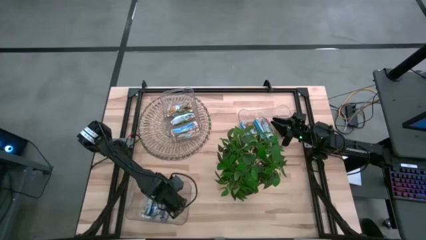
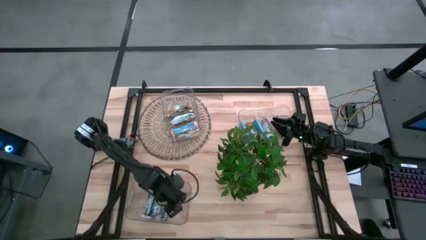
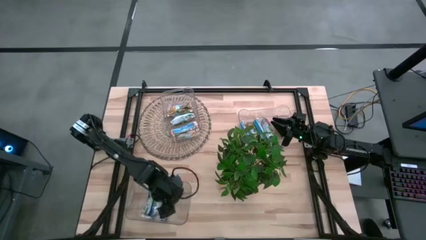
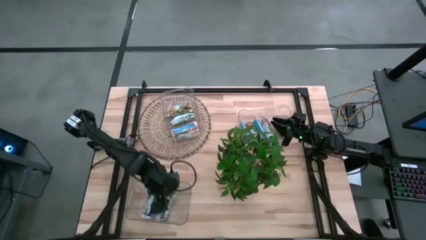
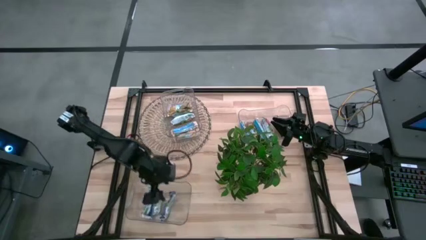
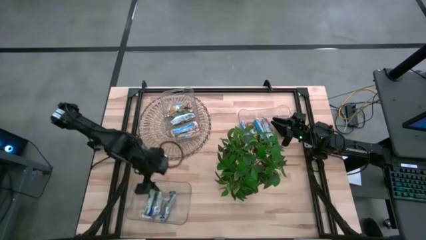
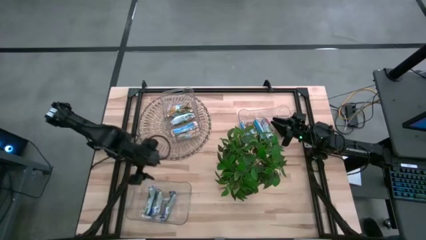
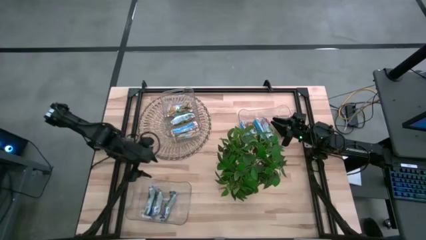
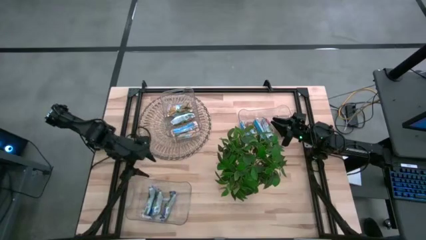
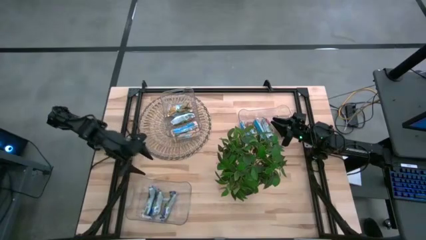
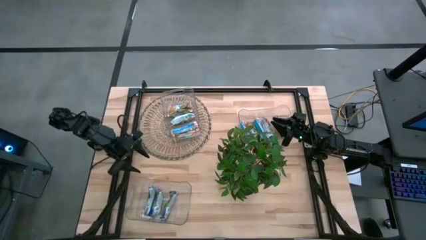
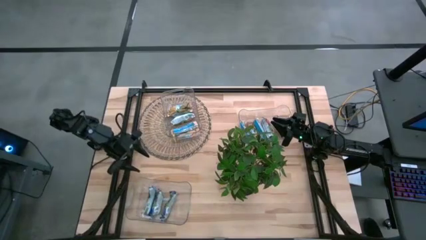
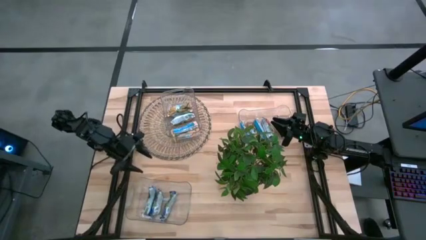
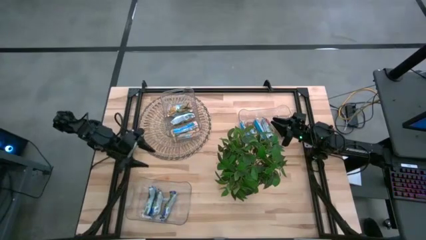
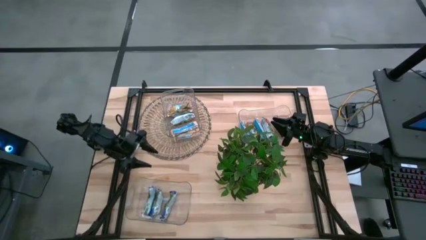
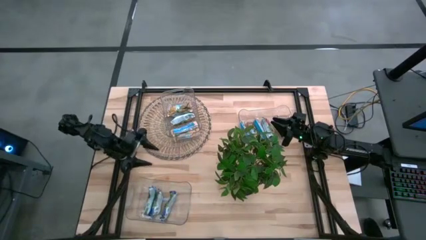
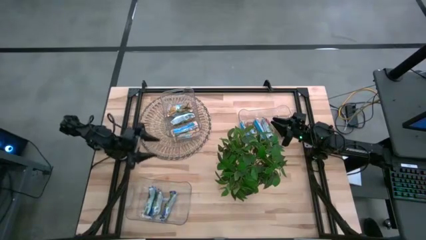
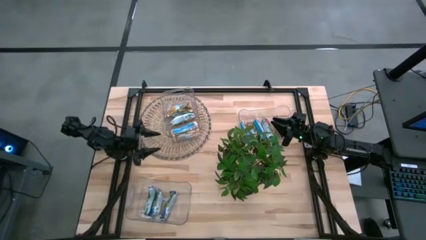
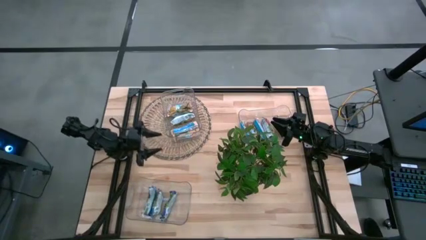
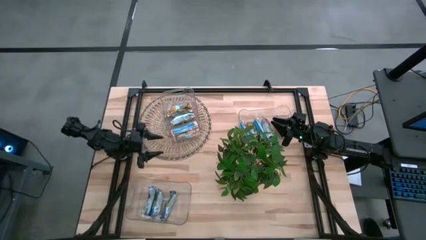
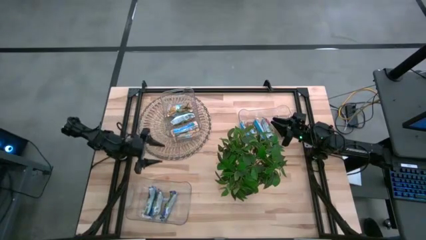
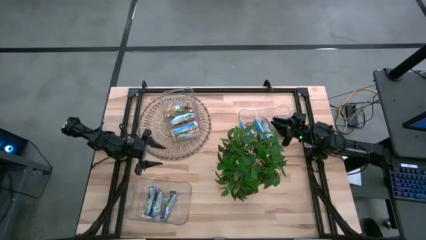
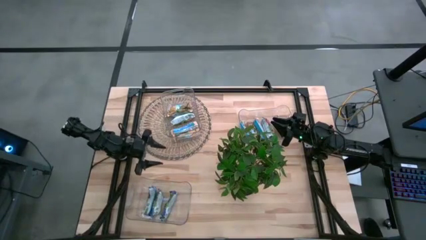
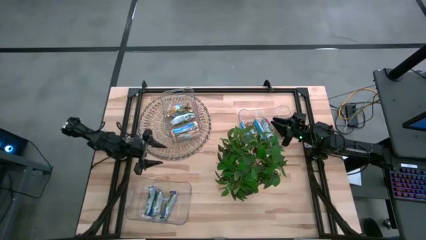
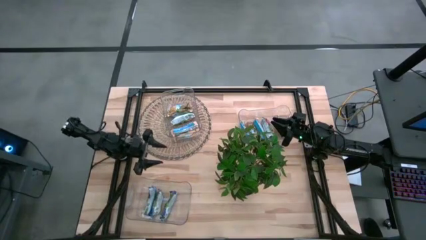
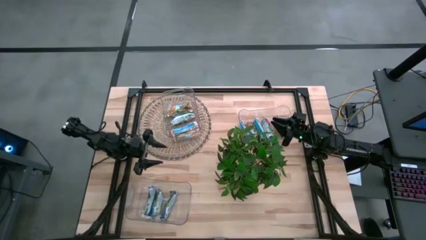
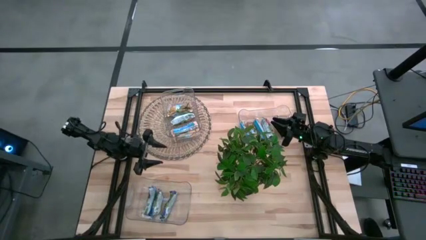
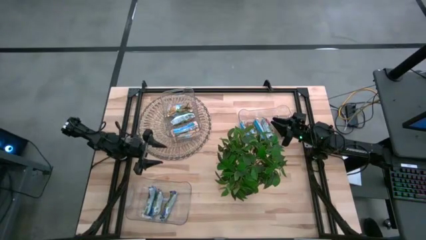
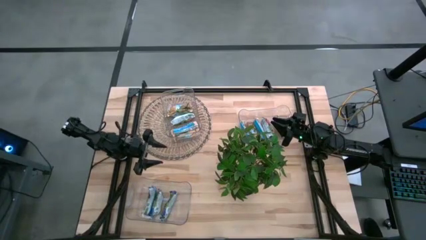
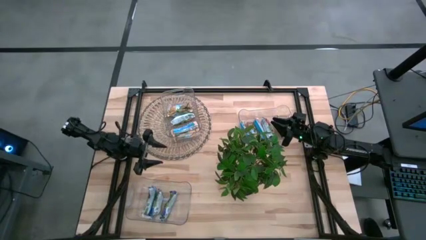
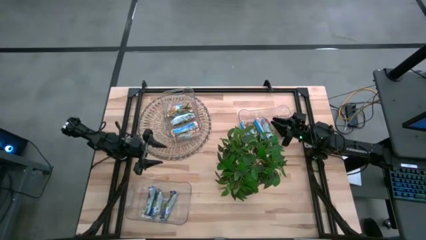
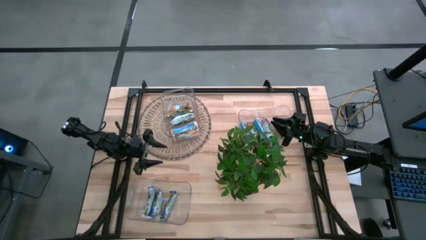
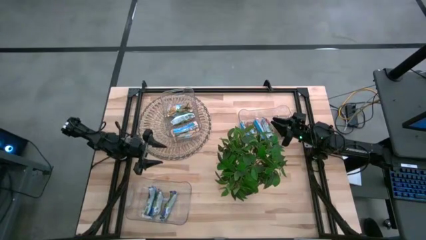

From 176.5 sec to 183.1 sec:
Task: Pick and place Granola Bars by type
Return to Home Position

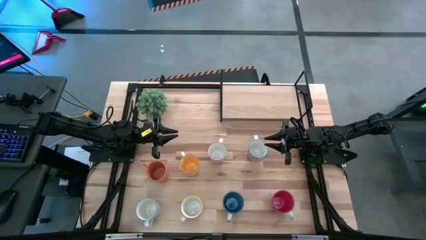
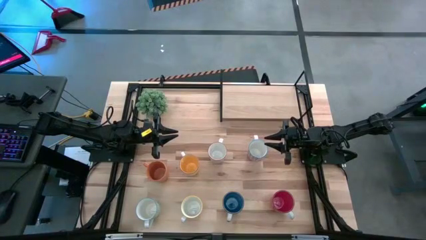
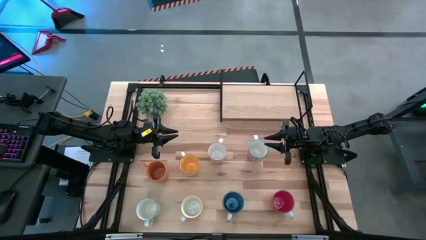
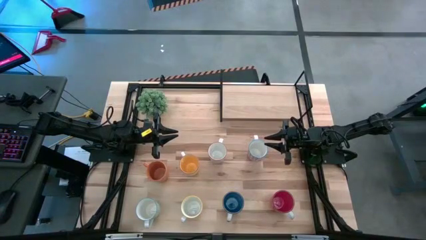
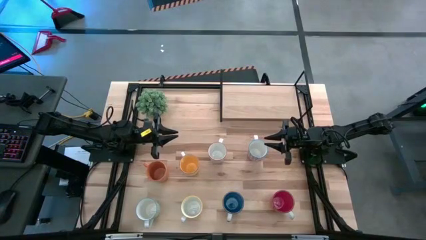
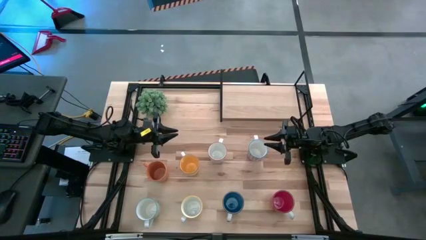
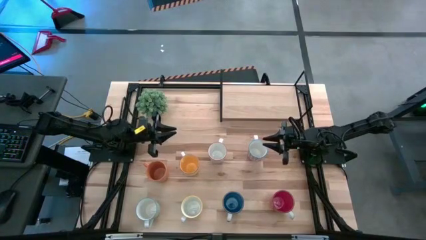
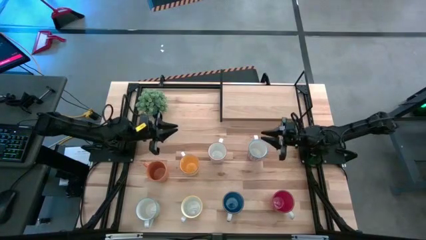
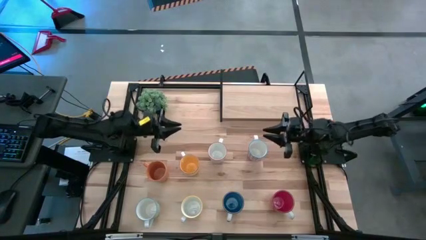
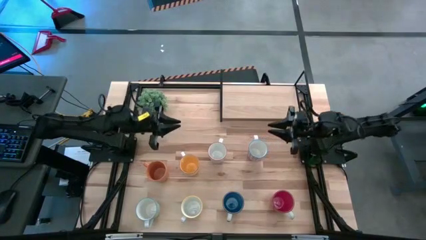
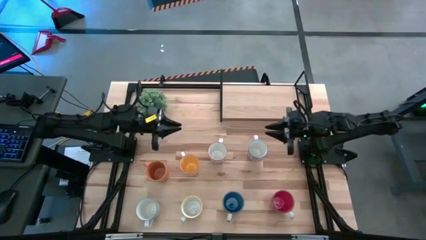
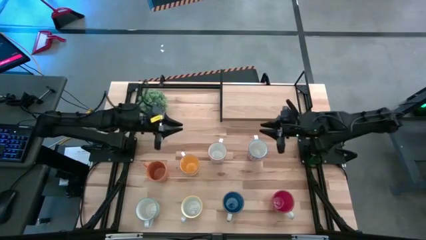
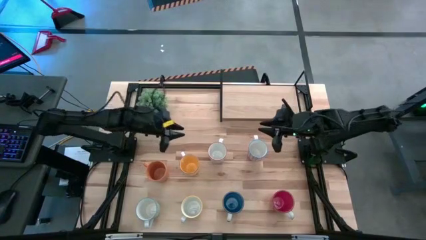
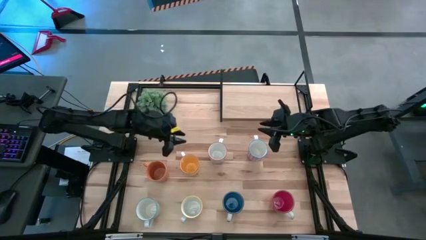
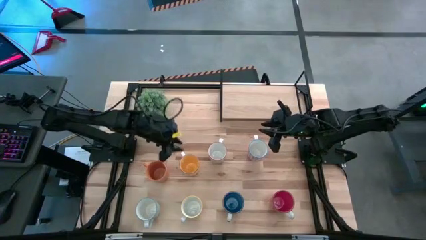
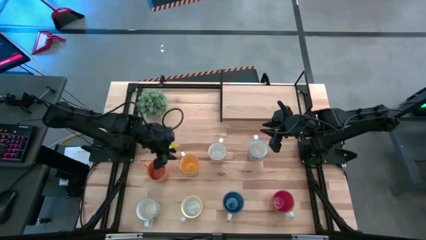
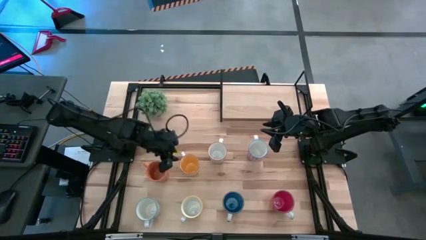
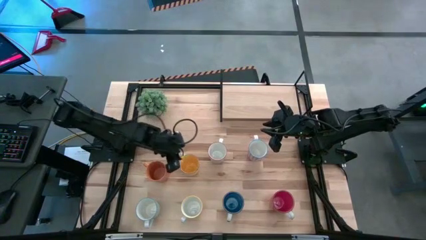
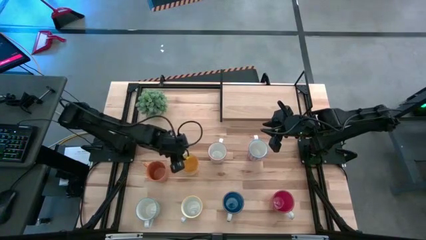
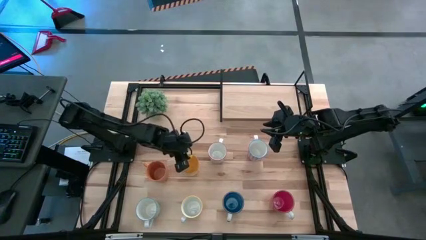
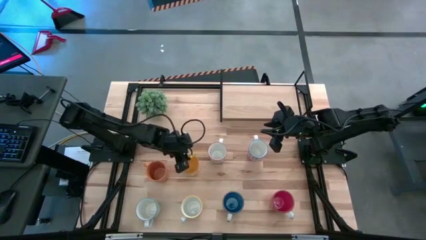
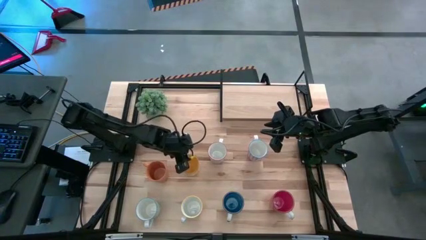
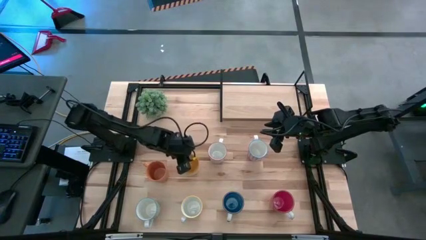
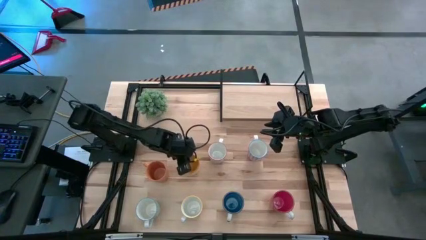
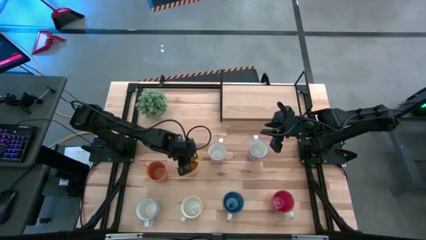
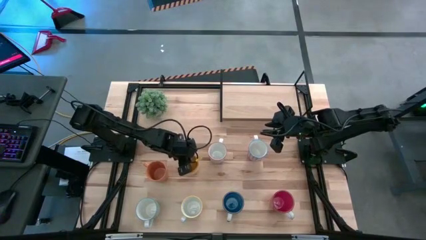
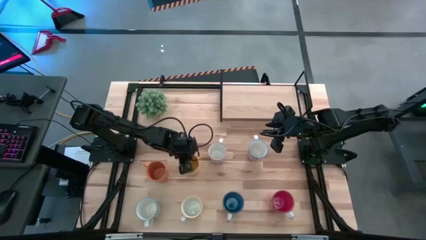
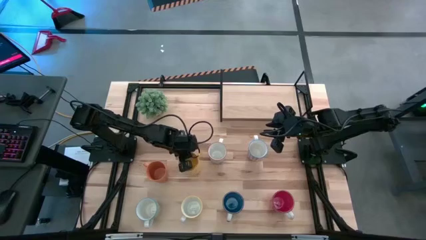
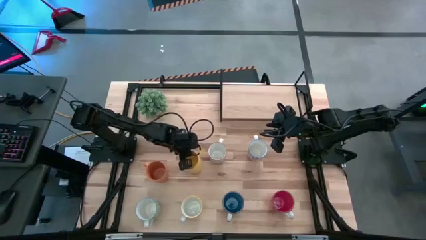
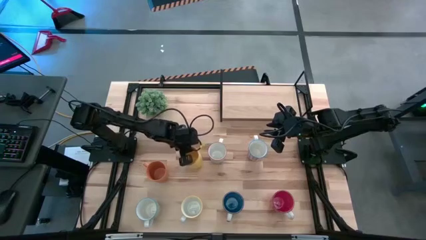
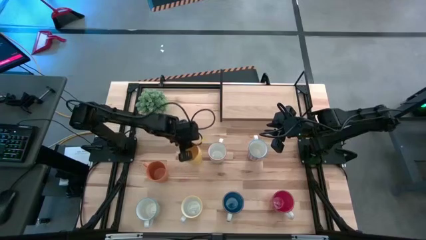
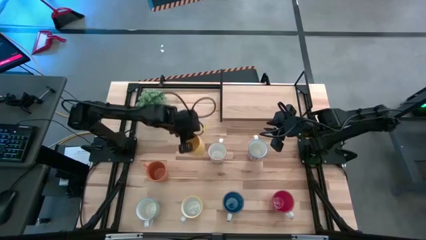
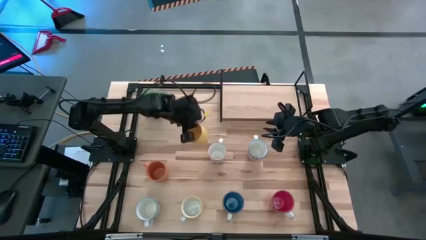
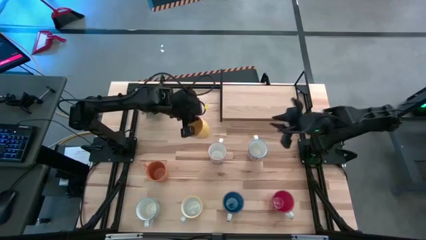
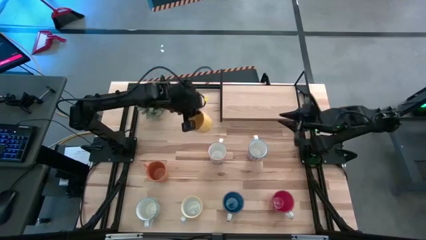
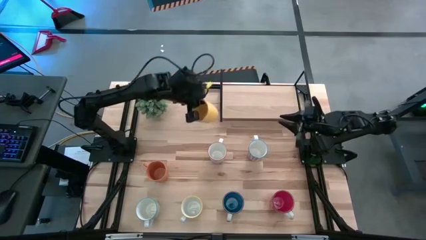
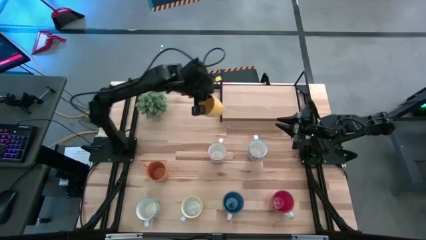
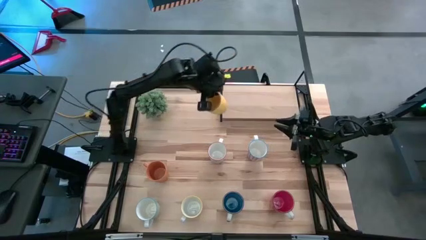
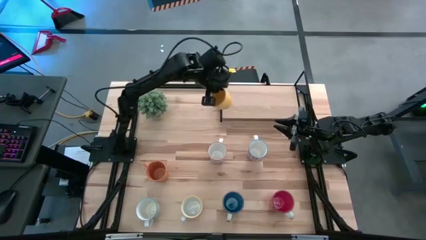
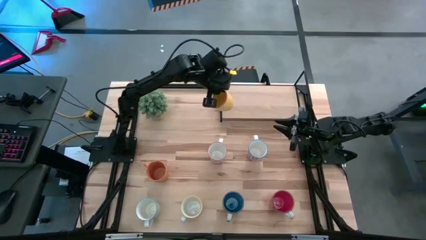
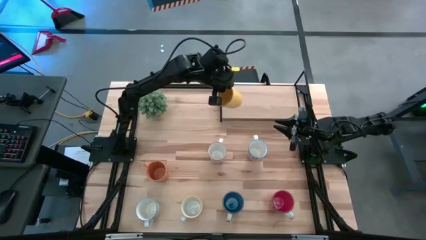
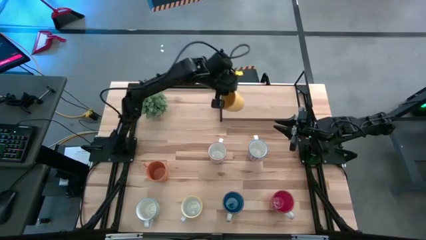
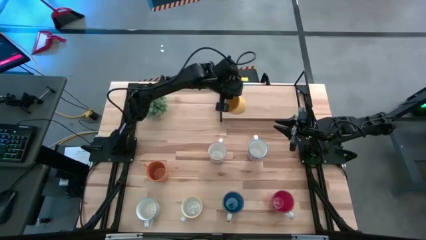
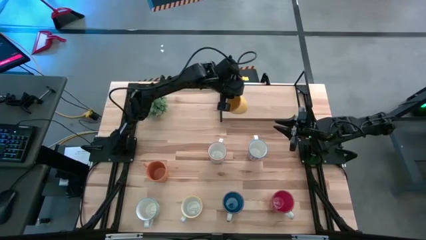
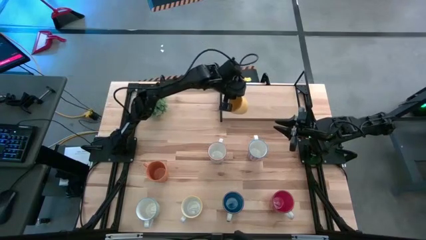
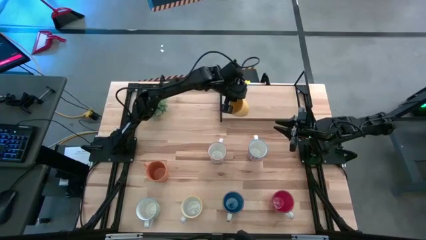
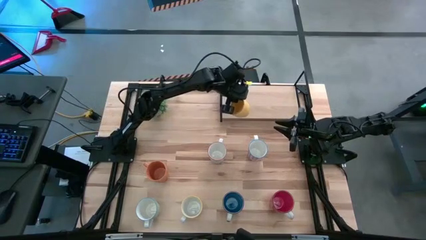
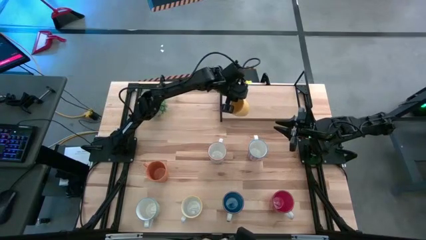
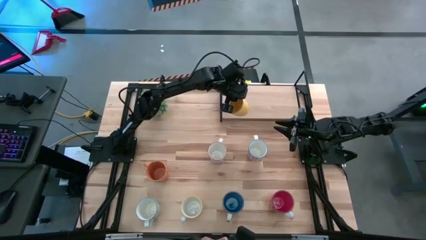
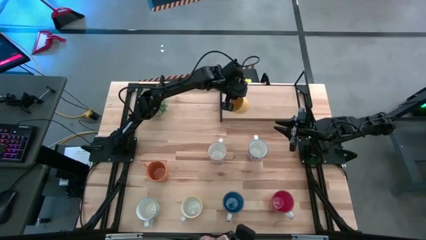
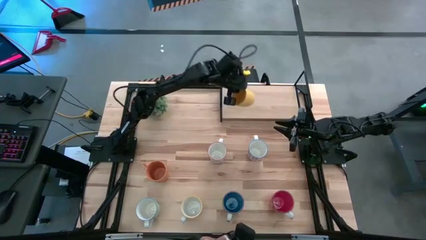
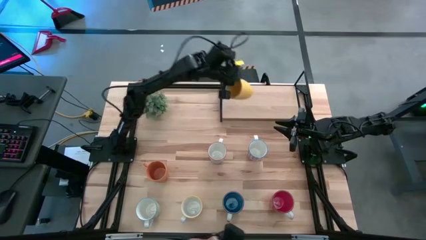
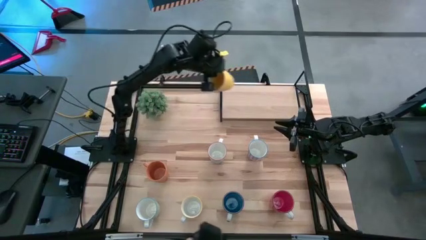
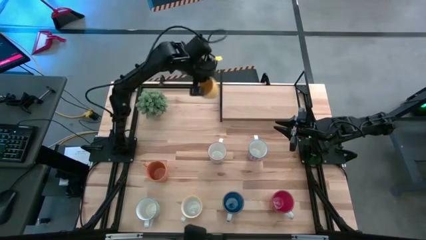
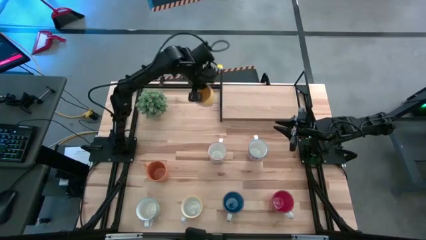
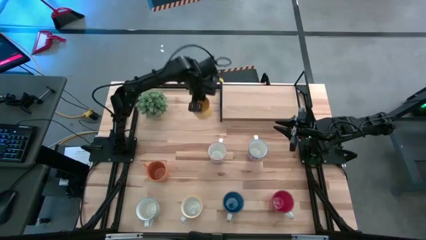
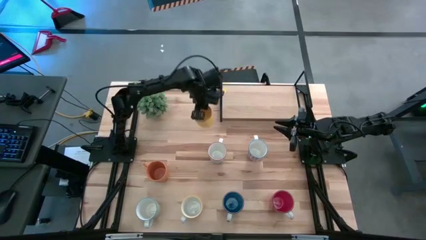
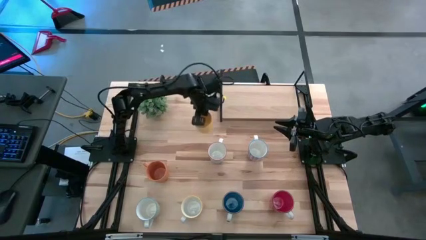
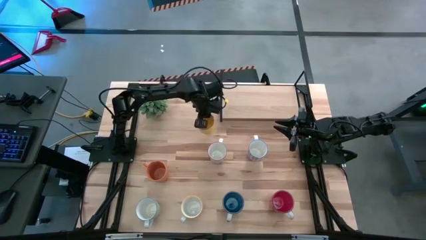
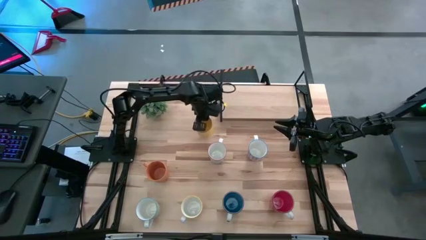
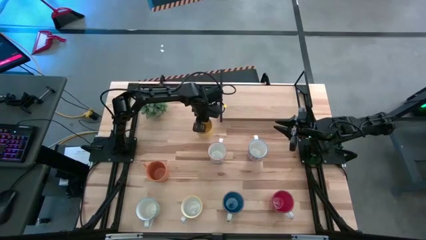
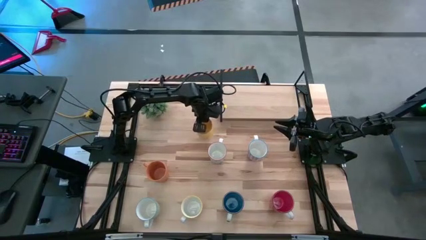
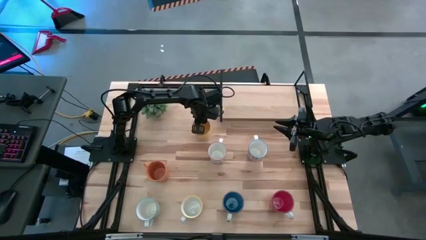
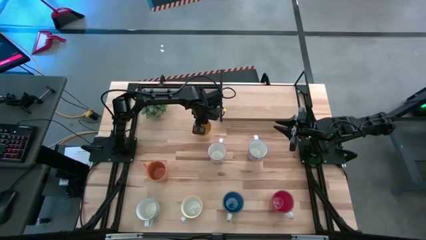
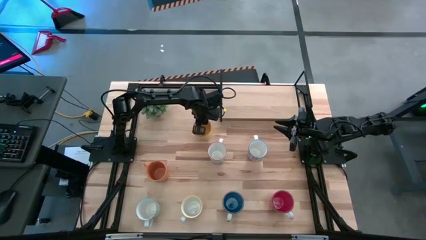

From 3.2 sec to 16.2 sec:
Task: Place coffee mugs
Put the yellow mug on the shelf
